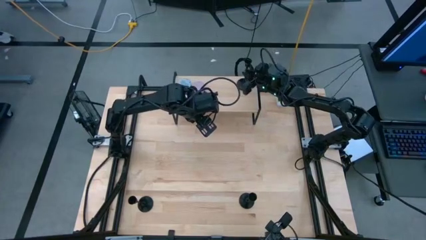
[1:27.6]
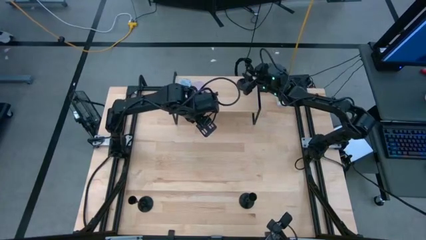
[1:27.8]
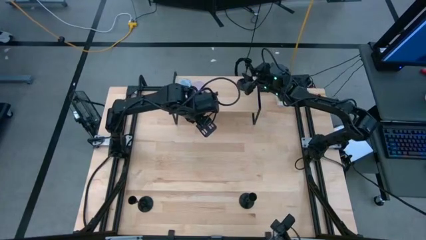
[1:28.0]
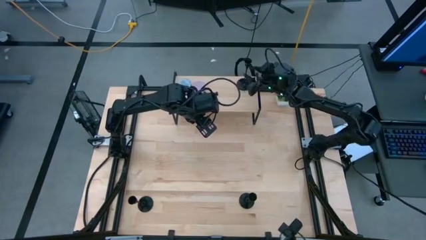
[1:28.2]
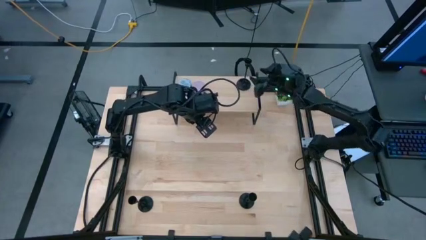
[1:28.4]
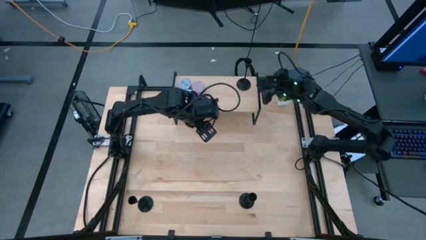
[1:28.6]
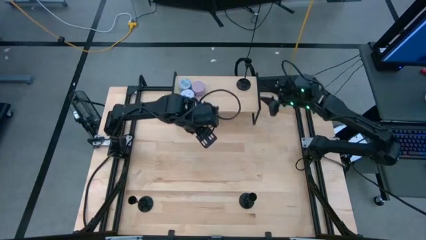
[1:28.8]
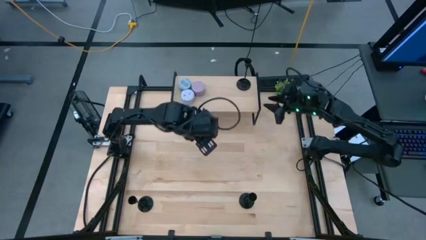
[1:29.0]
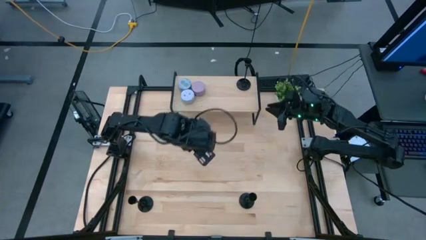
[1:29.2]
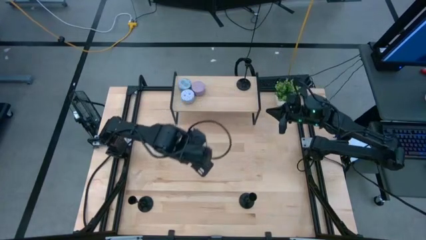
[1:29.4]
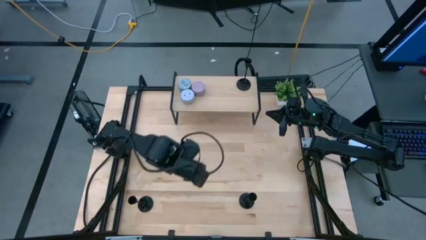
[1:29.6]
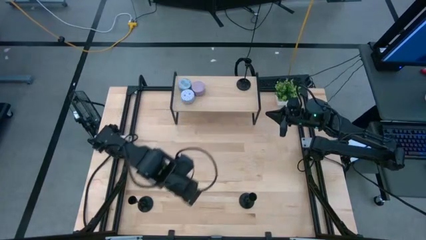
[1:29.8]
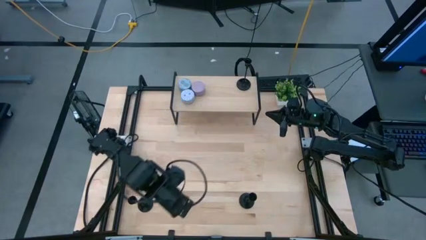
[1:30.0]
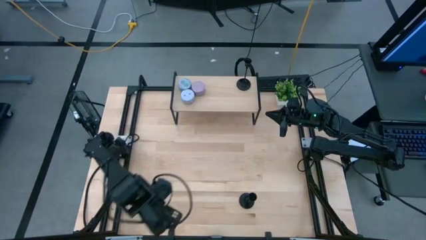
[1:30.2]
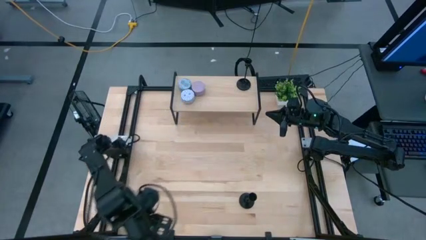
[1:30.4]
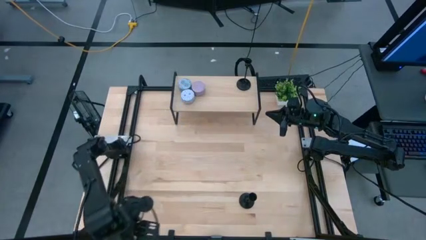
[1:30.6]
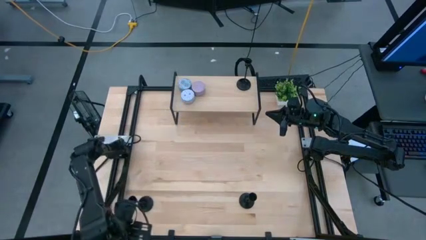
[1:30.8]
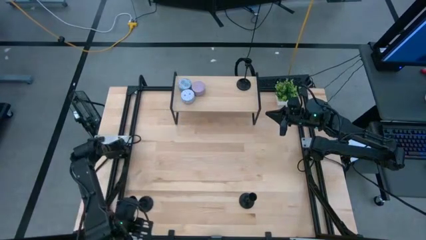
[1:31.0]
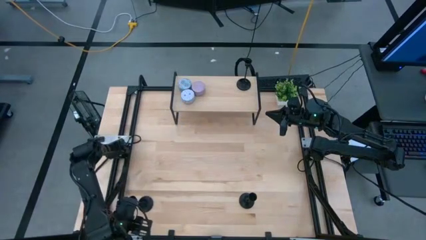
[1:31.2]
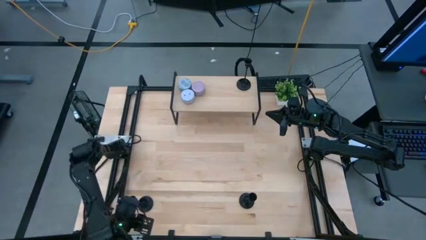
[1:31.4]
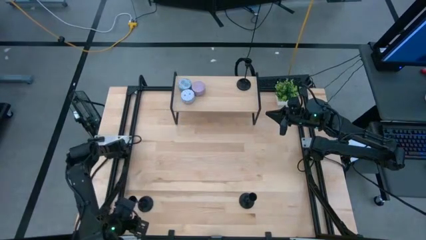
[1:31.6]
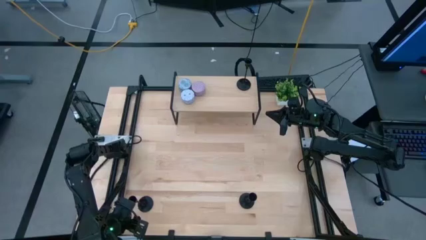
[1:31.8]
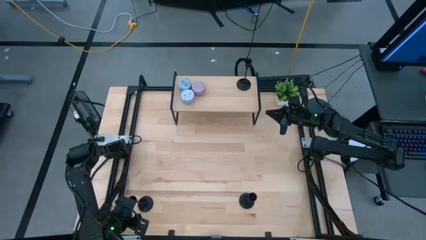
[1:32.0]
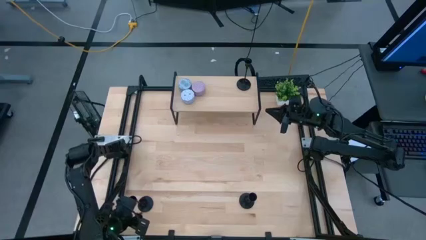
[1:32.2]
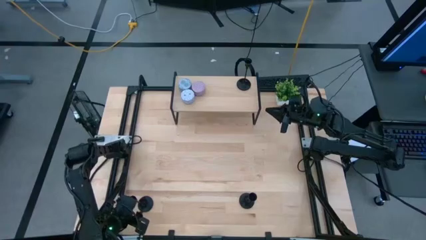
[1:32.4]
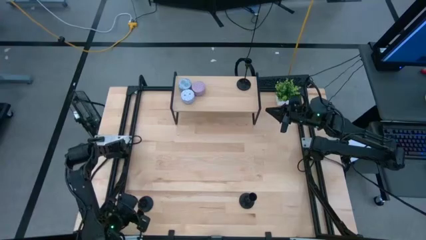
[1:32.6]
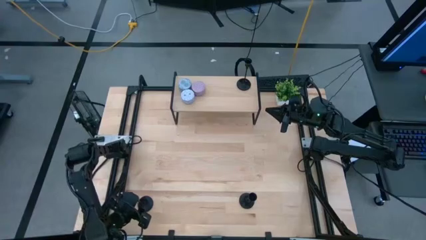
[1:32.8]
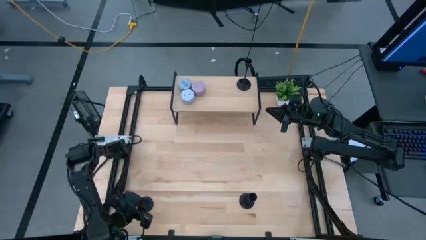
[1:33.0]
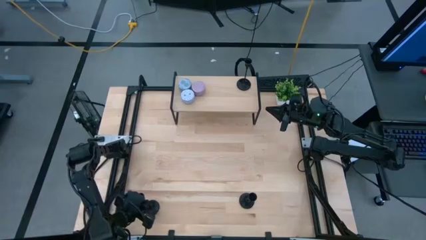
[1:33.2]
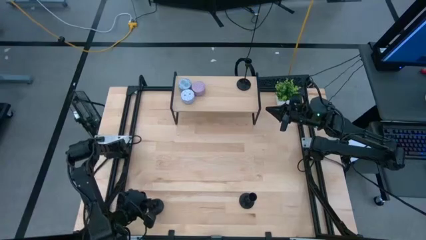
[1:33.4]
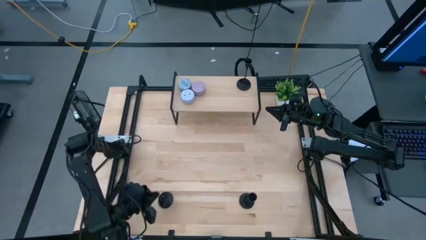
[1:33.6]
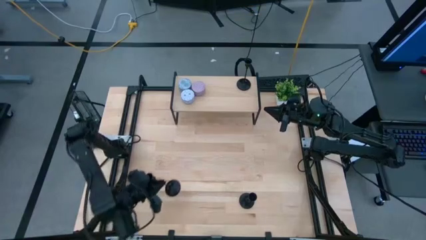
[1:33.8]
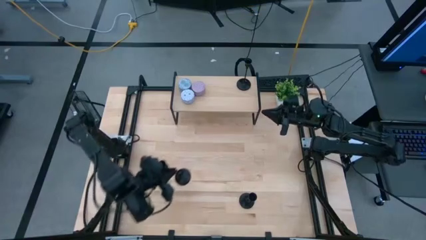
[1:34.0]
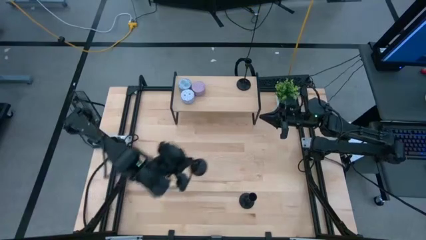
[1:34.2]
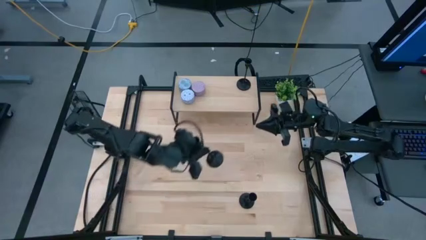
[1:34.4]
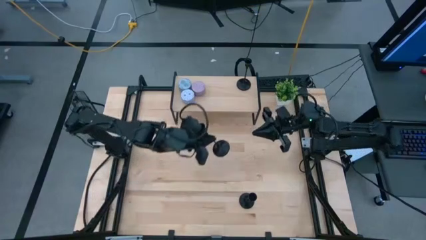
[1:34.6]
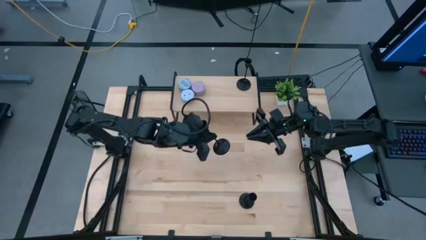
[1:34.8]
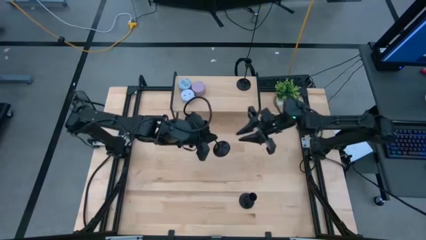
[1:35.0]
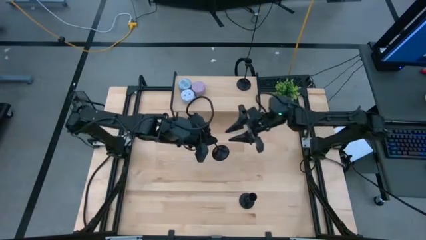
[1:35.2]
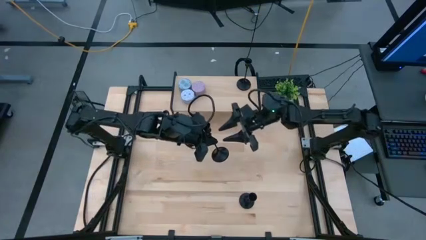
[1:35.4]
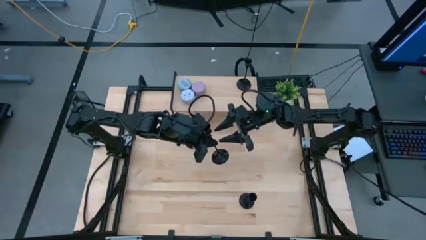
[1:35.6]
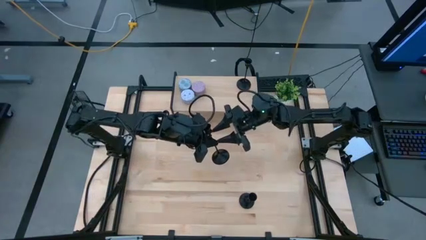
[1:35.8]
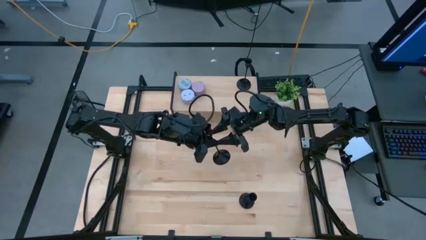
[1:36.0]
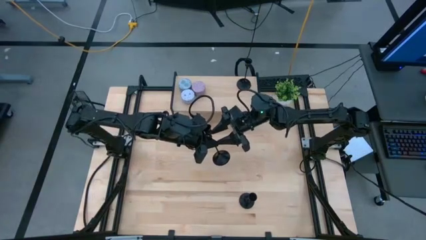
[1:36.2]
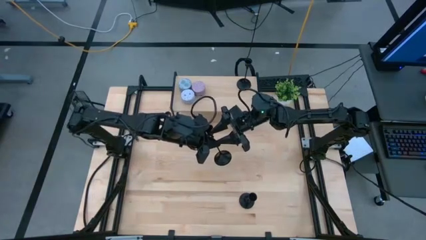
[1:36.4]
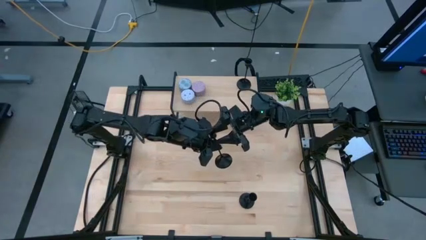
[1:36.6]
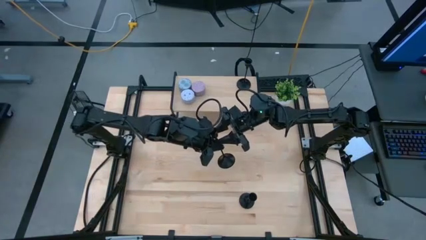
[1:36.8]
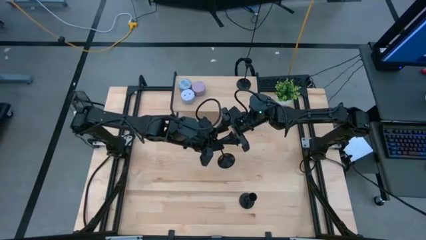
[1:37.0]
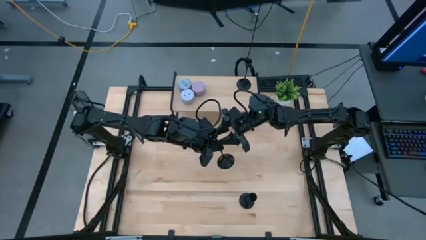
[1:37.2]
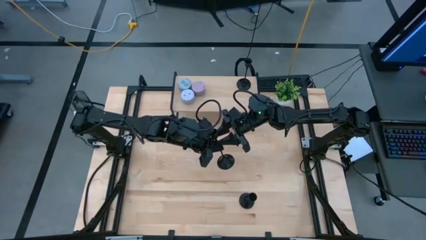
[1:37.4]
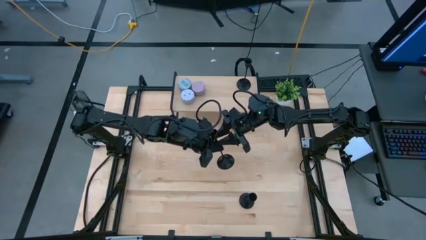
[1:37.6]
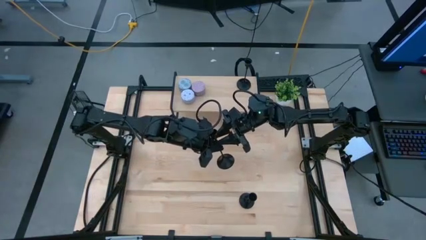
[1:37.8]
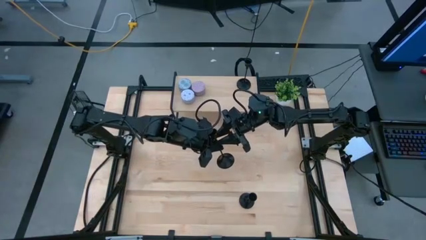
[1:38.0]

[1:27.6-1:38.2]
Task: Pick & Place candle stick holders
Put the left black candle holder on the shelf

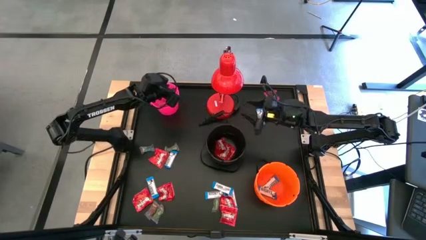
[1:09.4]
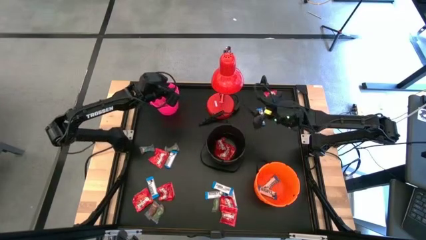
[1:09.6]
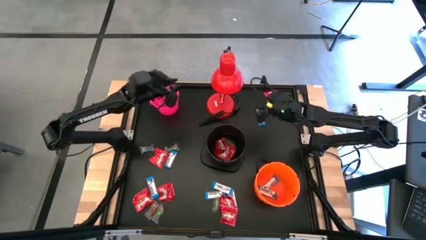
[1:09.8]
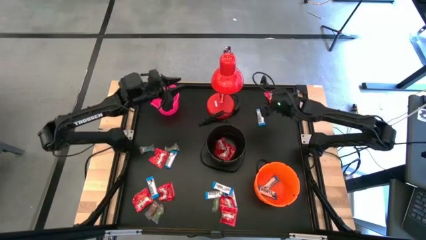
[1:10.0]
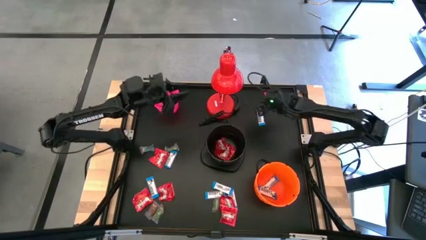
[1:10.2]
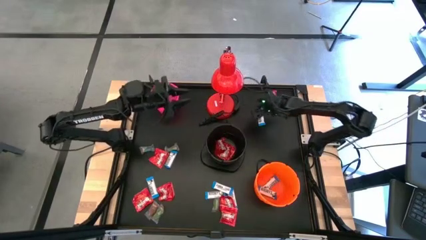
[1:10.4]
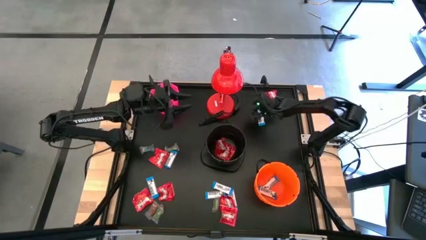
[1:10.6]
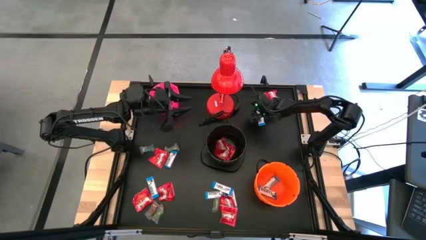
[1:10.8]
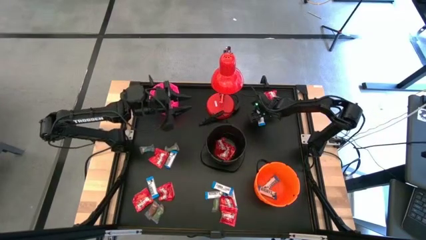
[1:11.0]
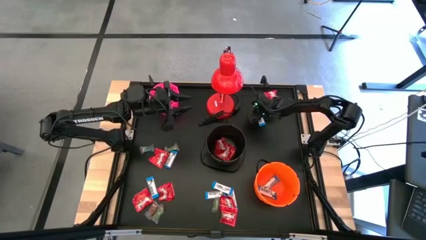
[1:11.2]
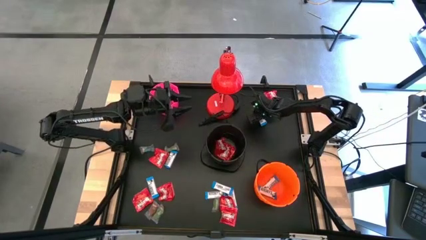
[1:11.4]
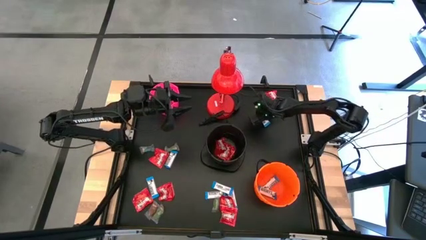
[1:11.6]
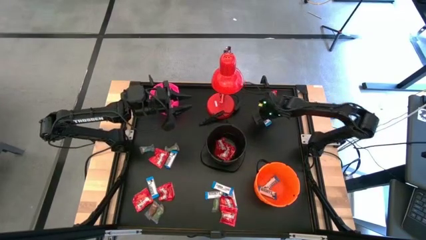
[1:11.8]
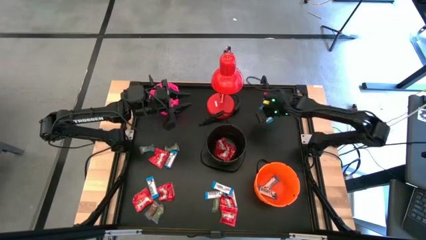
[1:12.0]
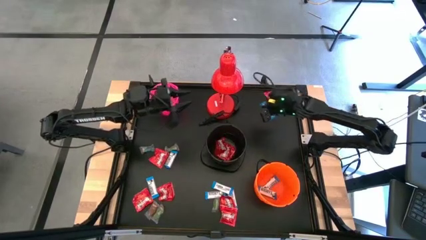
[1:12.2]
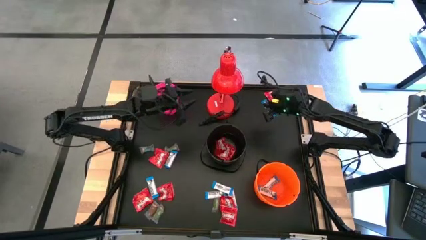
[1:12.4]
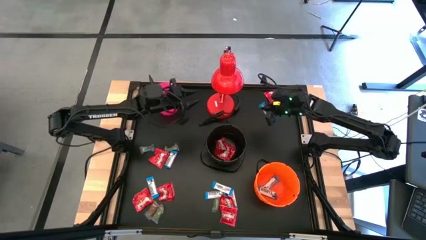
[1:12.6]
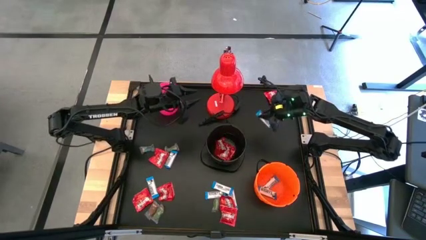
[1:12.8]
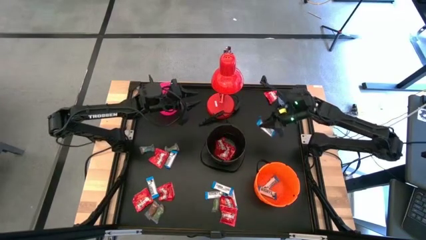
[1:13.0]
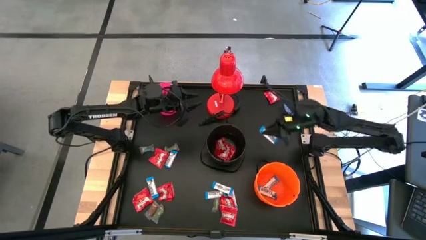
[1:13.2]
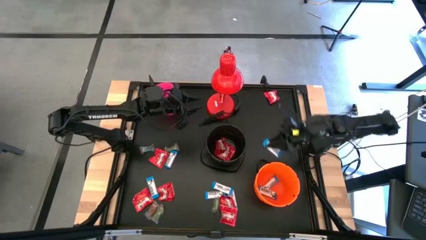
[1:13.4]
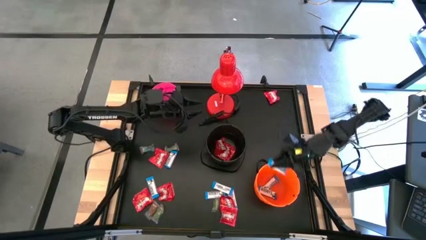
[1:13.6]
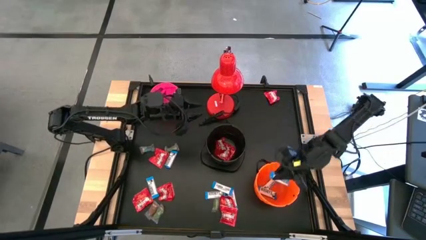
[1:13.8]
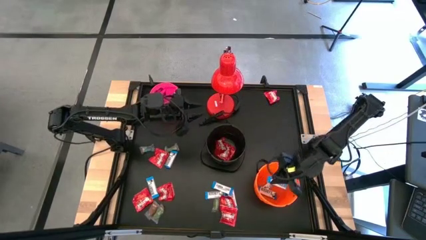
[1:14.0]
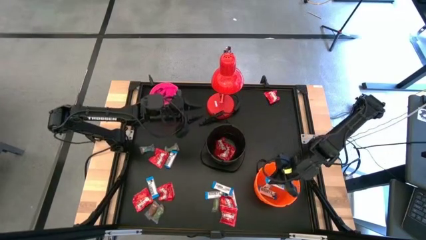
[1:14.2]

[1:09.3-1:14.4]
Task: Organize candy in baskets
Put the white chocolate into the orange bucket
